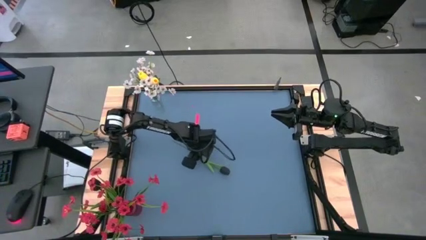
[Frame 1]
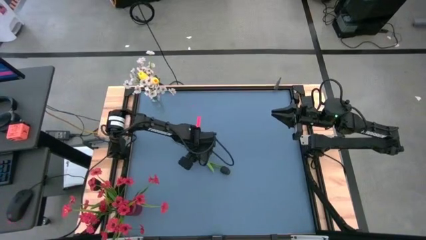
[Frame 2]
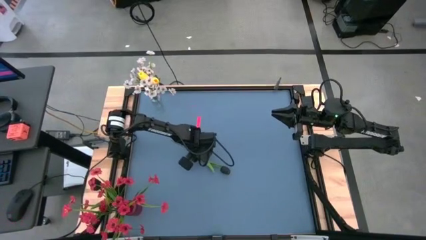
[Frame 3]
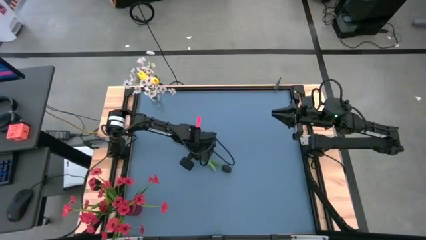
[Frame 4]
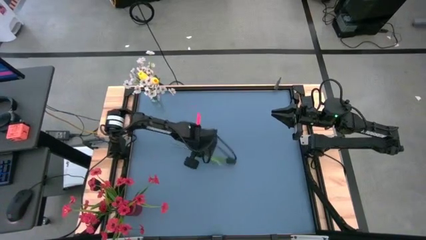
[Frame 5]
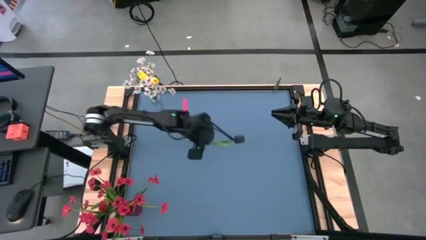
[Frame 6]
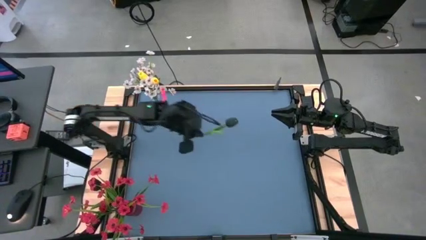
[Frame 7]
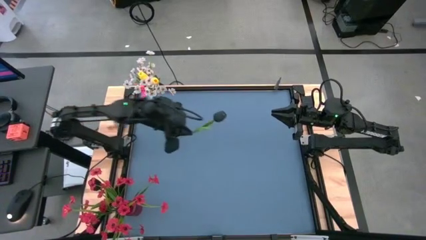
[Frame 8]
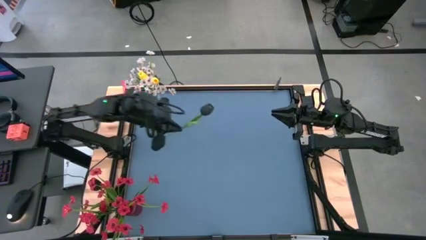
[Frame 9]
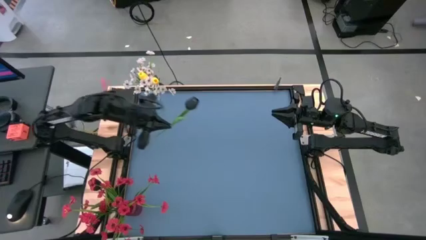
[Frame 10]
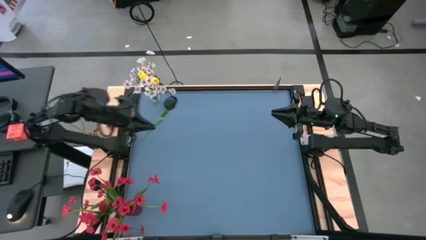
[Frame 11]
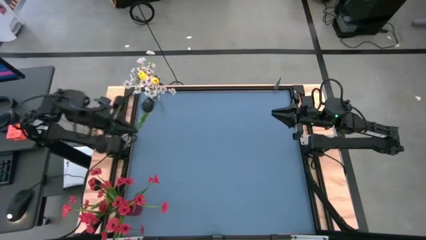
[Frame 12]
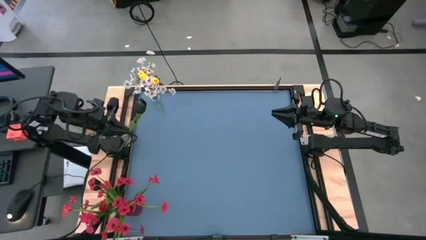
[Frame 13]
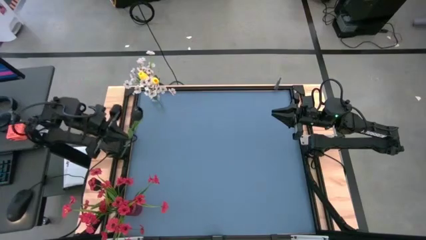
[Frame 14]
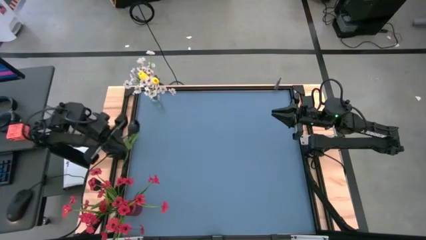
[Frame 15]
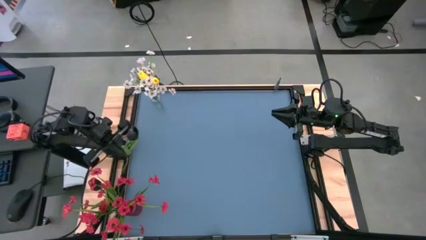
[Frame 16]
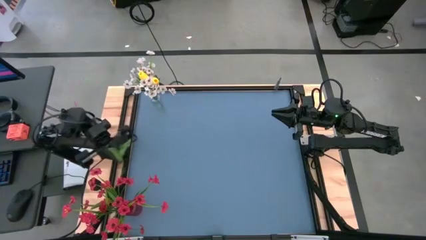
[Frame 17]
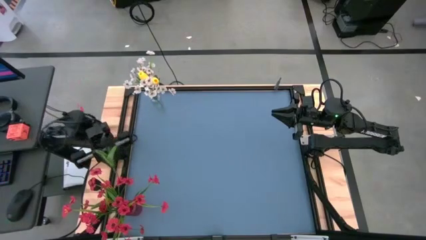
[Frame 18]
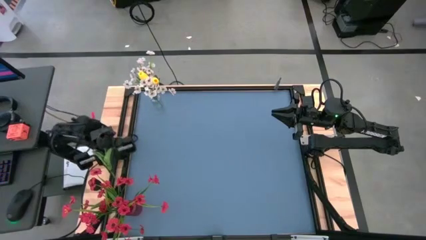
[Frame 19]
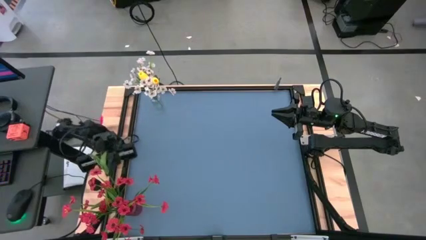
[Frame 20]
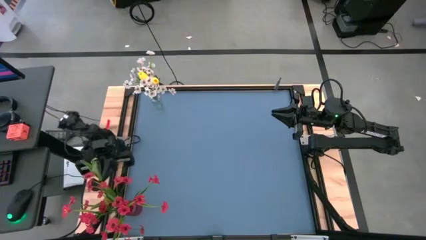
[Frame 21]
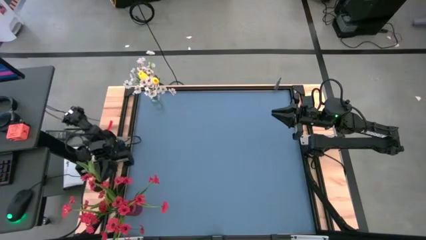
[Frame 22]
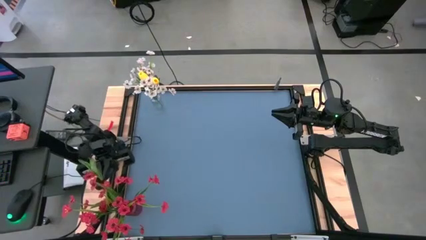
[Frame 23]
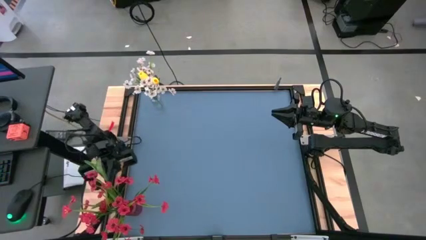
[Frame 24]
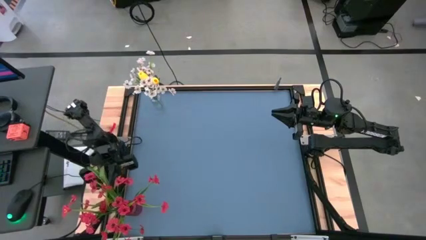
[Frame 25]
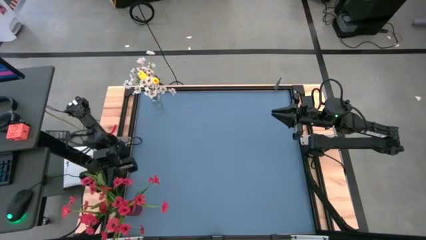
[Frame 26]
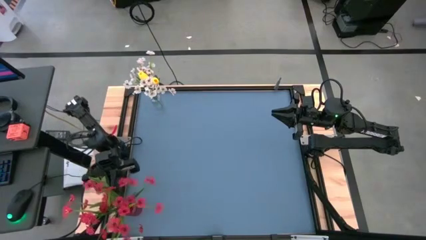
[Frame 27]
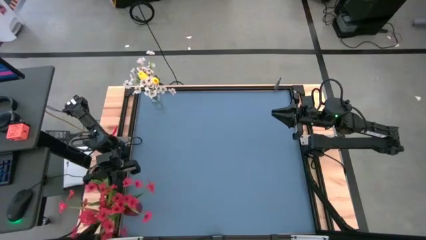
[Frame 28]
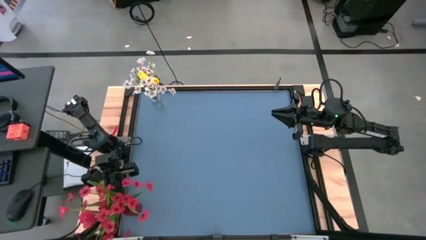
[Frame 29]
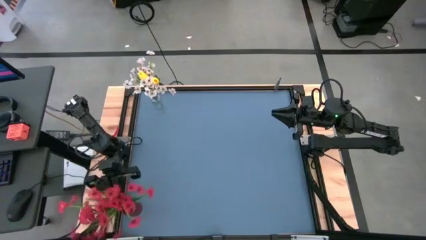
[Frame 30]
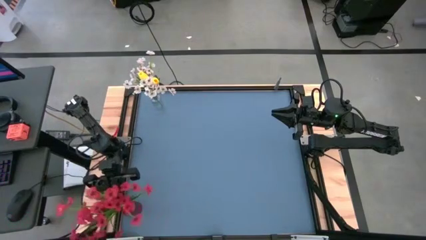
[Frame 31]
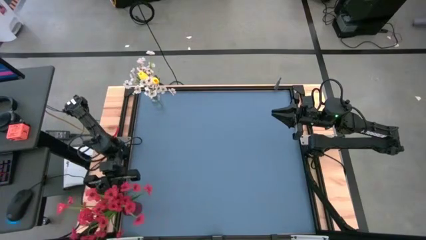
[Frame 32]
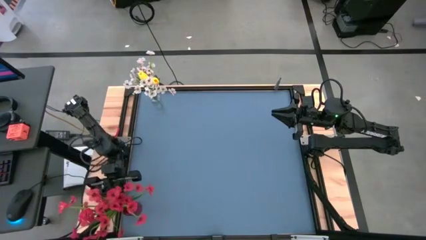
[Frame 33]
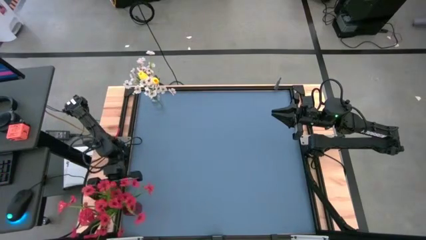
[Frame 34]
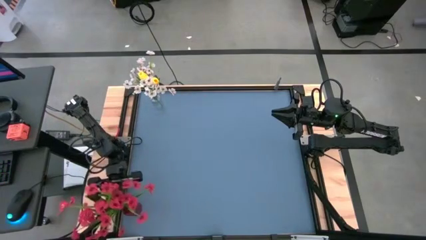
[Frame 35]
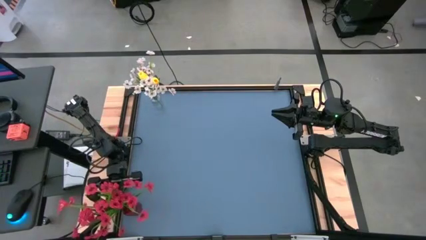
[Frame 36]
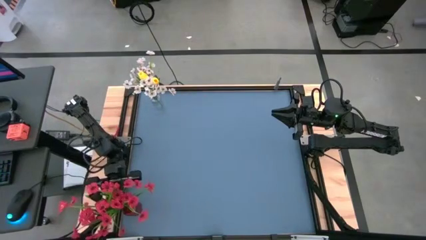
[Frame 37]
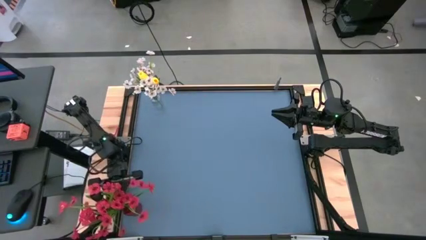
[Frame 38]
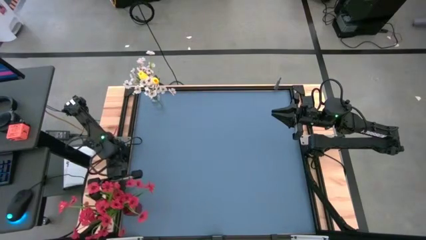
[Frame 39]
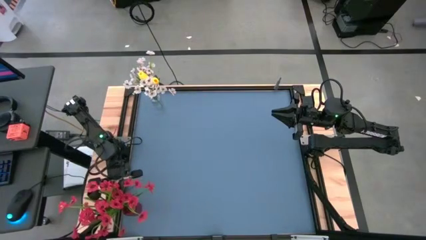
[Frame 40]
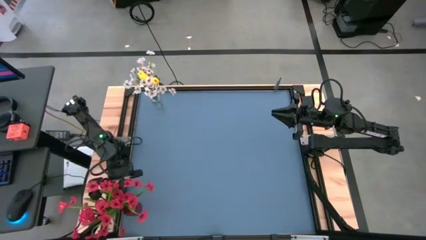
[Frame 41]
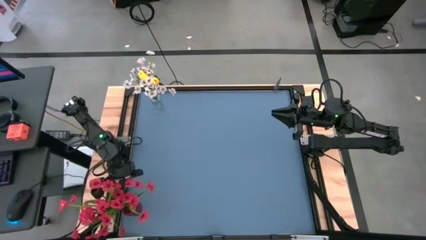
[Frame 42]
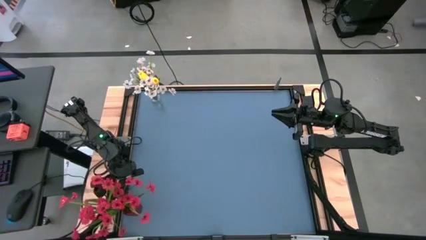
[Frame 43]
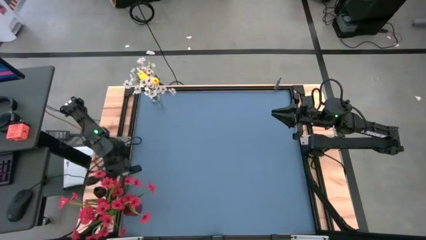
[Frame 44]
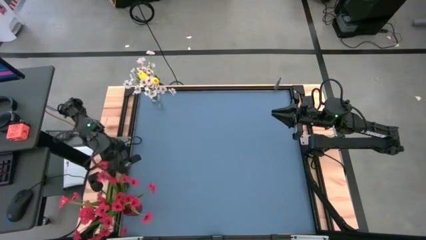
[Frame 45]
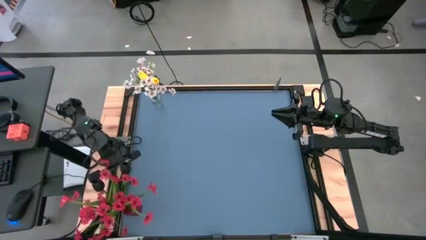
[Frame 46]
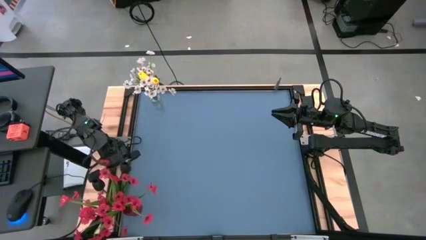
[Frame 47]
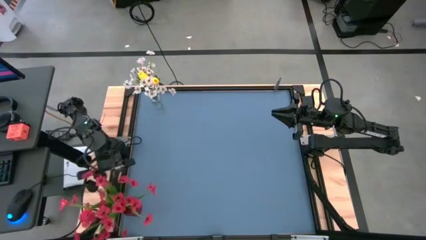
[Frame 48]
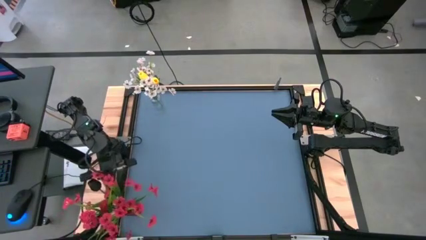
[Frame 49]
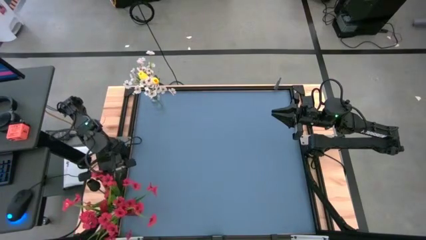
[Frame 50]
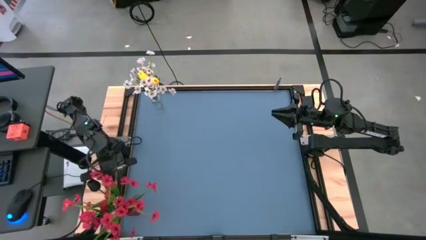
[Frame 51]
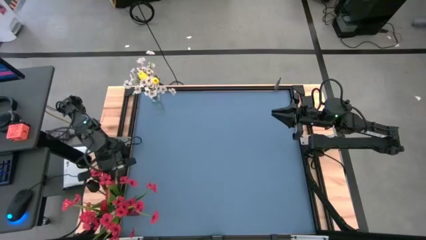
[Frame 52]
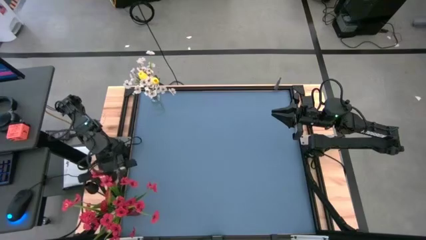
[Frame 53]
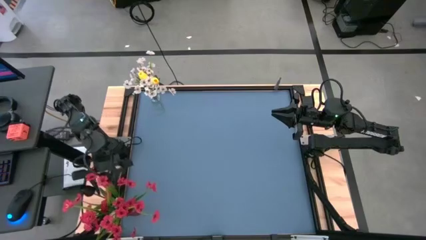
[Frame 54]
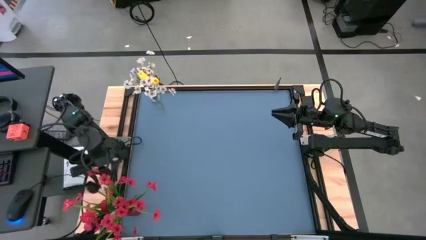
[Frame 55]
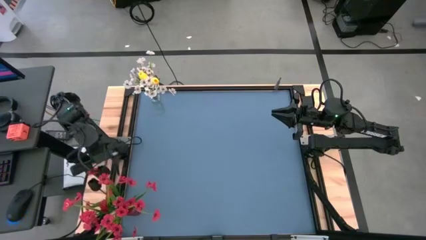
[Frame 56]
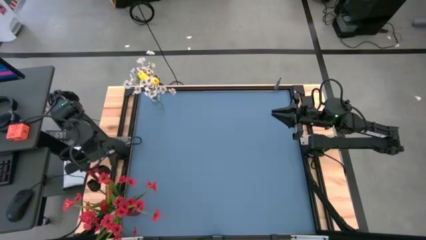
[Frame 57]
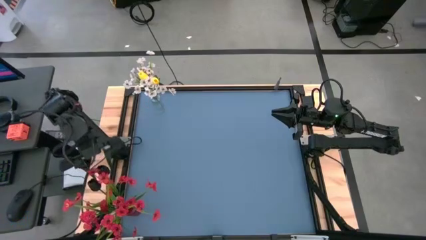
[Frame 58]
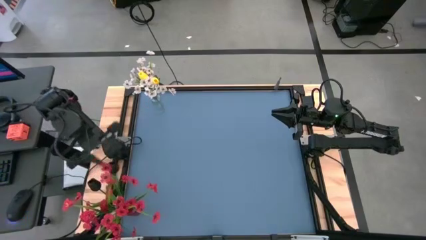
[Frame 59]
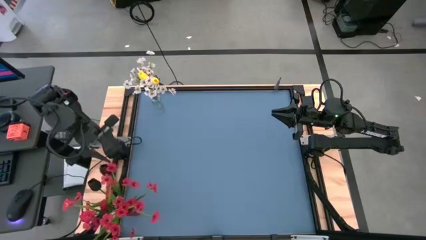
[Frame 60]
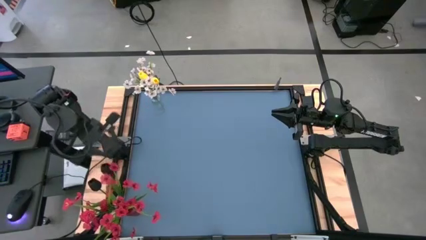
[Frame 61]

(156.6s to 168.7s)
Task: Sort flowers into vase by color
Put the black flower into the red vase

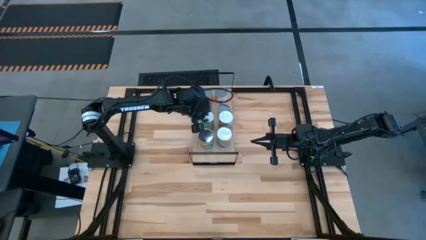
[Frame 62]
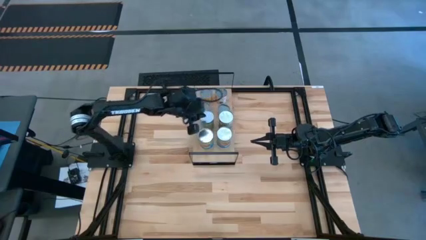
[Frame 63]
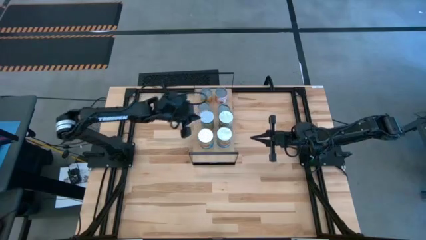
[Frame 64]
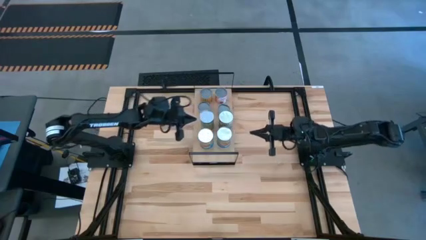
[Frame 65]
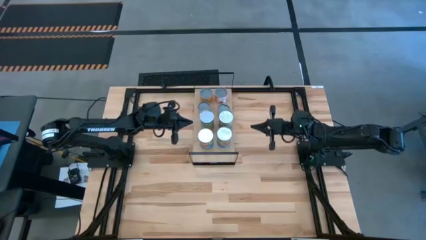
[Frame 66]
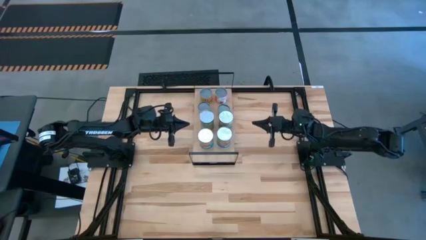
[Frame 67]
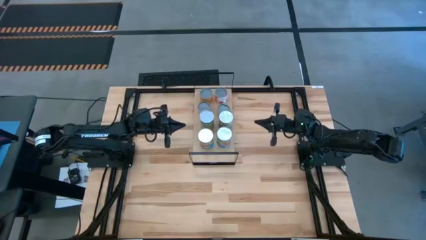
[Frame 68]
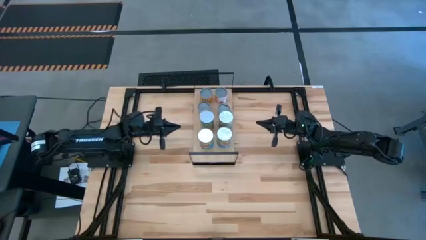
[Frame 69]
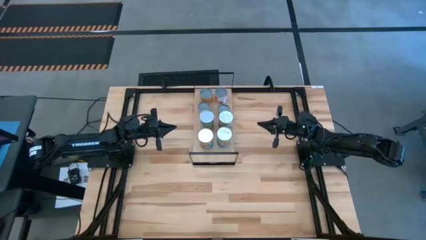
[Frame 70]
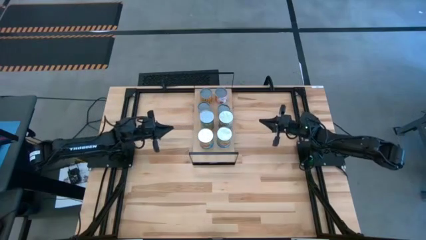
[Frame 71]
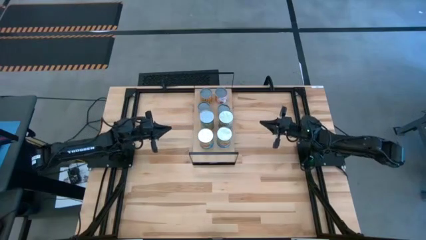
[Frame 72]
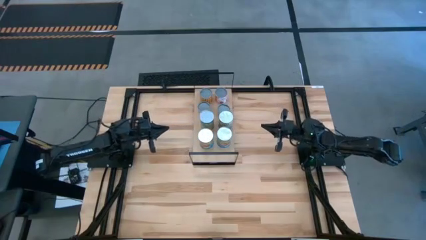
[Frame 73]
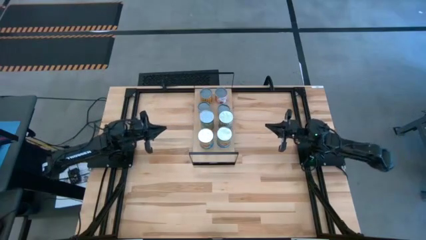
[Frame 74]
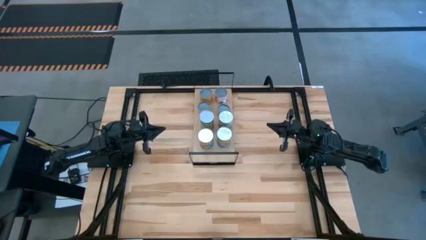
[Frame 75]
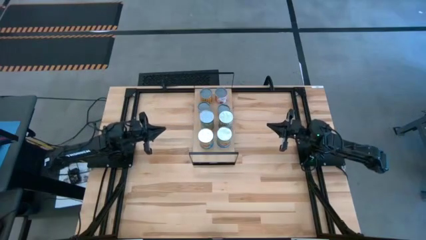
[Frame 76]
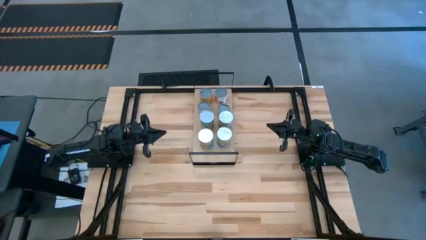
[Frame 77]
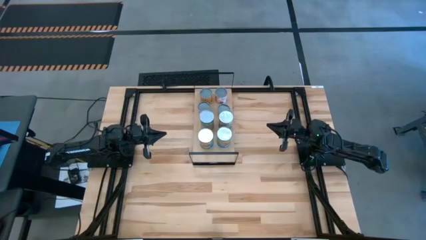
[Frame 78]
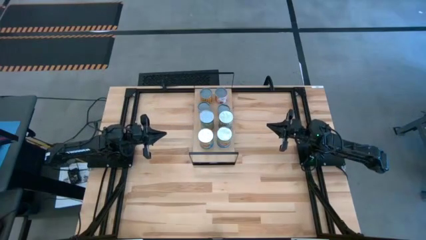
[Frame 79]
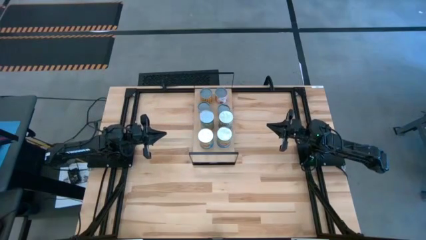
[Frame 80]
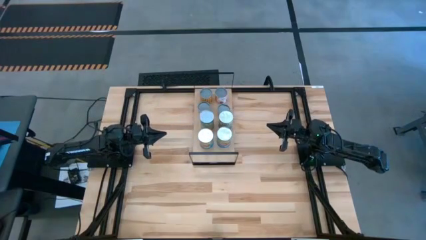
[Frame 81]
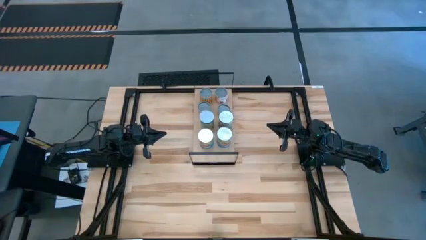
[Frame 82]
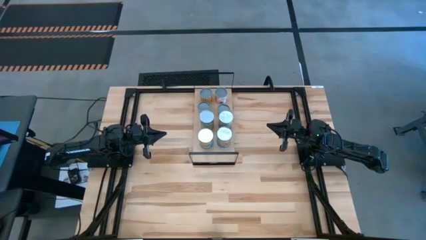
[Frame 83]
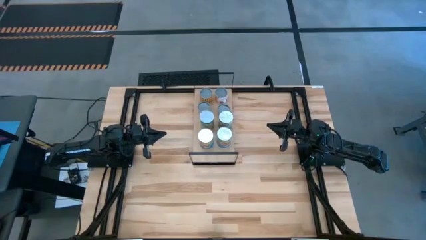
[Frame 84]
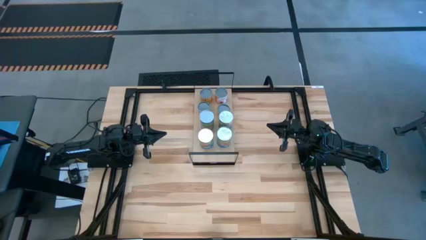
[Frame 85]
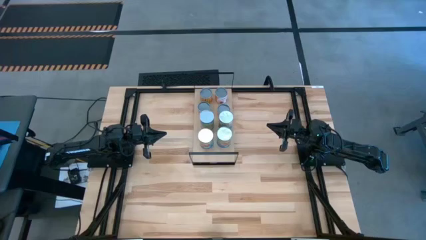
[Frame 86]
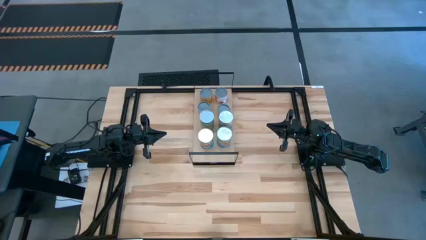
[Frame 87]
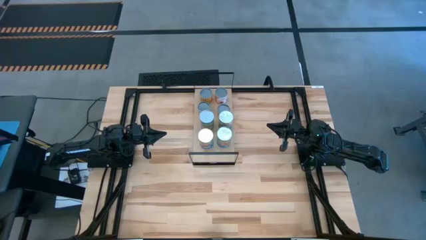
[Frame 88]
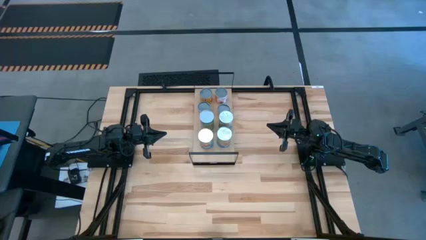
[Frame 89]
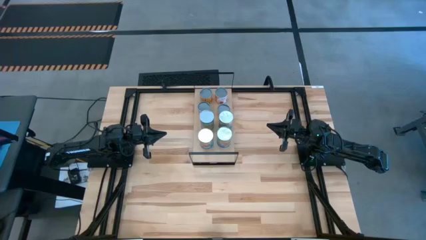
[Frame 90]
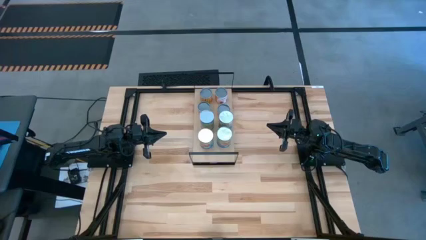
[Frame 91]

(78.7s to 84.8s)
Task: Pick and place cans onto a shelf
Return to Home Position
